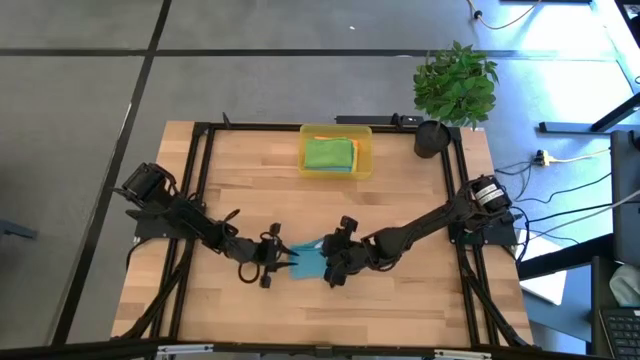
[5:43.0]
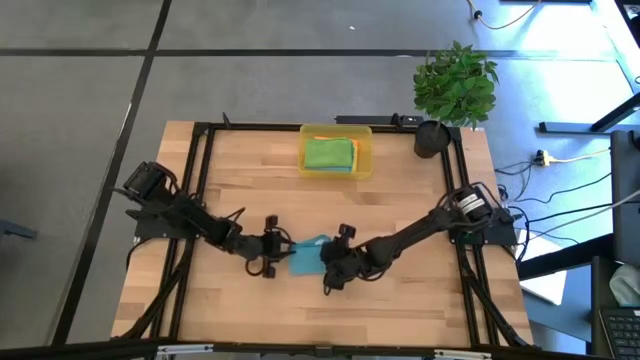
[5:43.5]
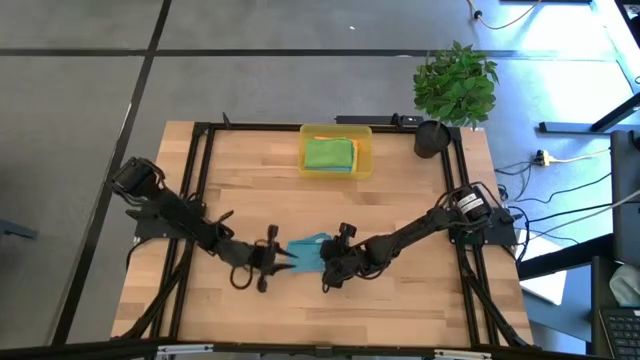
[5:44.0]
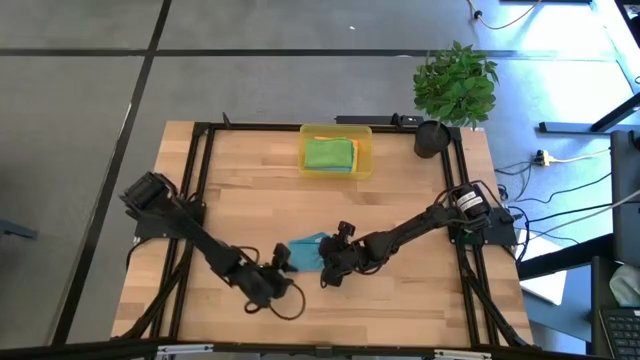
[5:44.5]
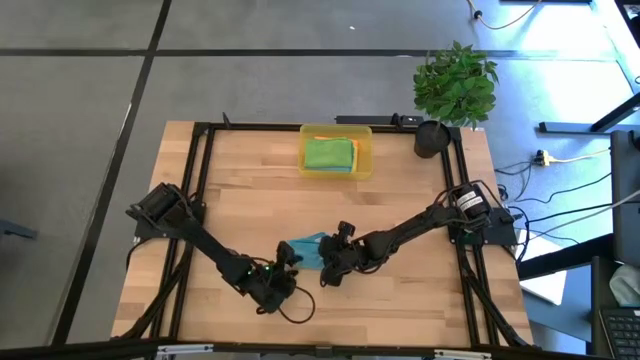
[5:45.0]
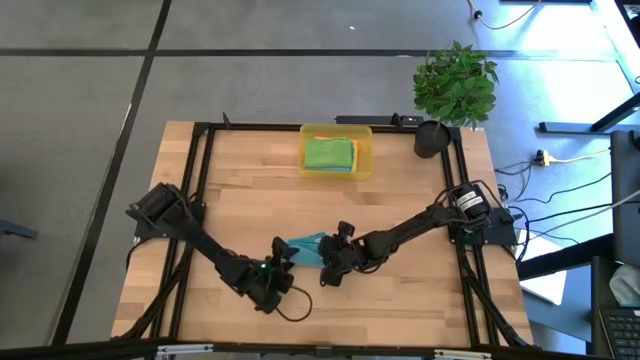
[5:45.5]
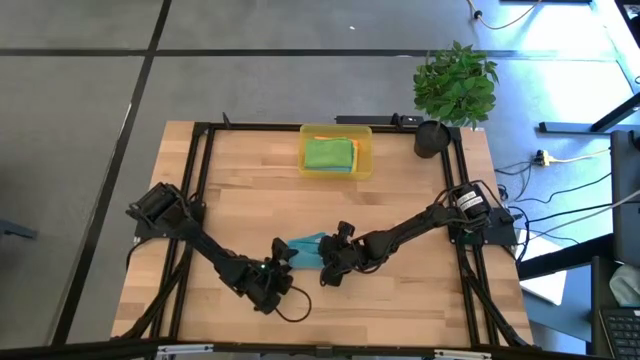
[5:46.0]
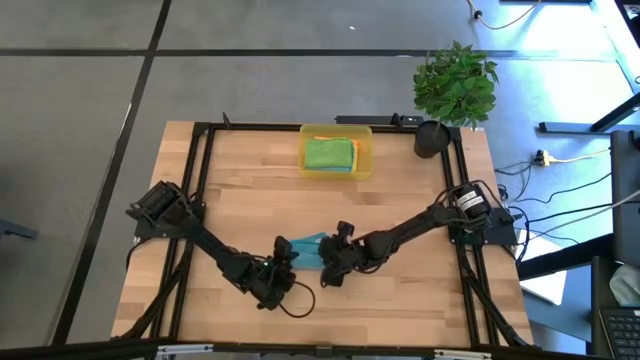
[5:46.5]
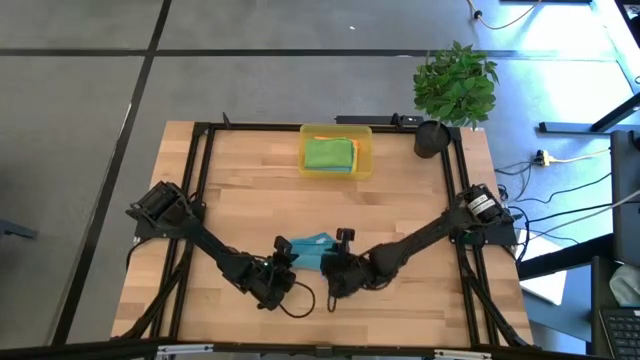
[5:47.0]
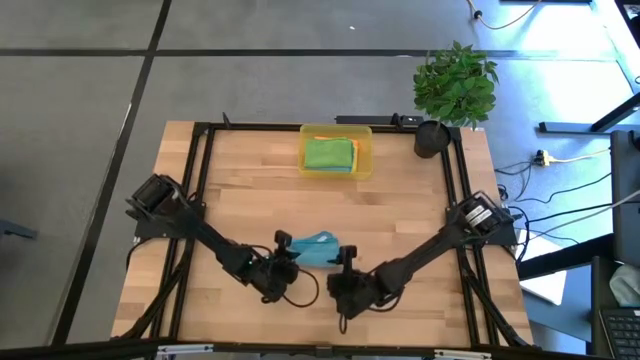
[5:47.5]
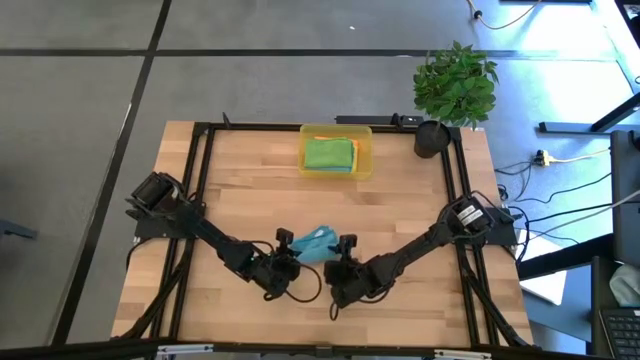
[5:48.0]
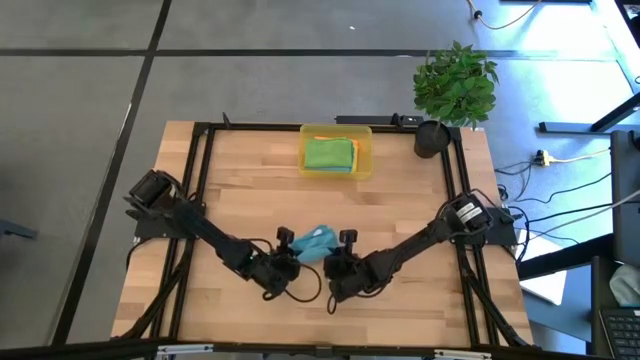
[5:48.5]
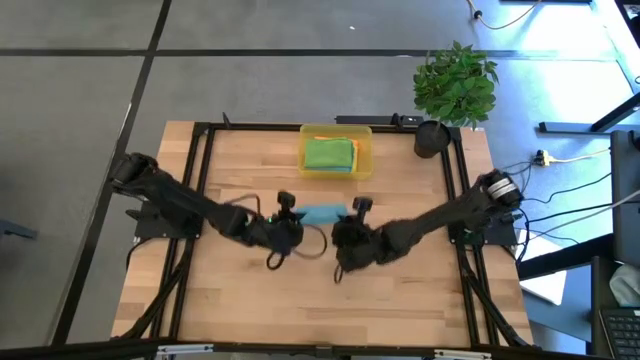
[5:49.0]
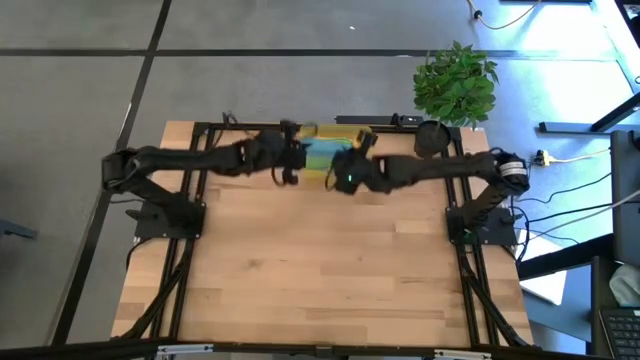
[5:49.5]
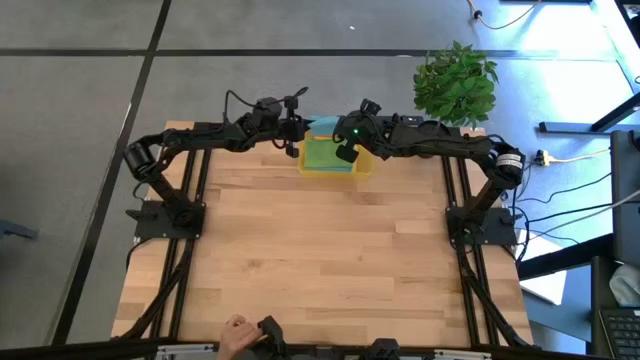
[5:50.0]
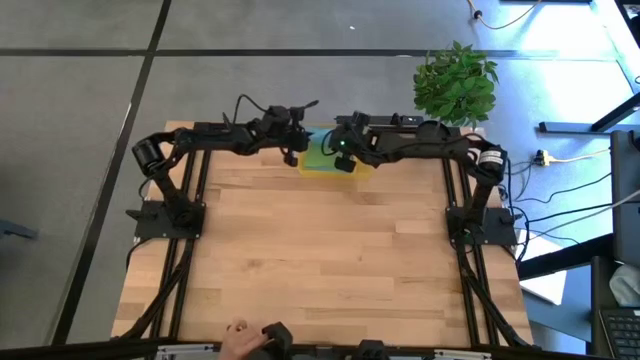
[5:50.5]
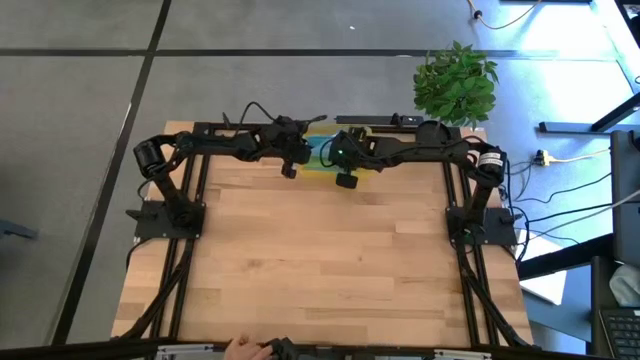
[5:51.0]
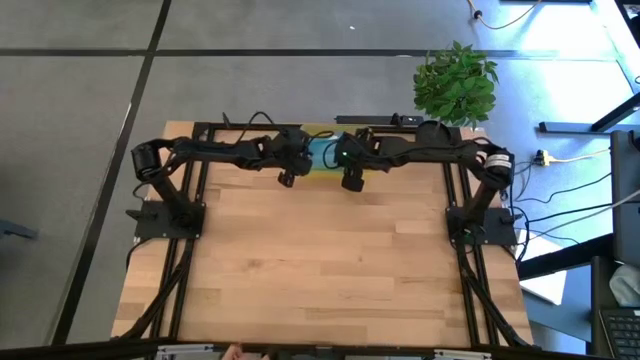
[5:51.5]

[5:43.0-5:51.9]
Task: Fold microfiber towels
Put the folded blue microfiber cloth into the yellow bin

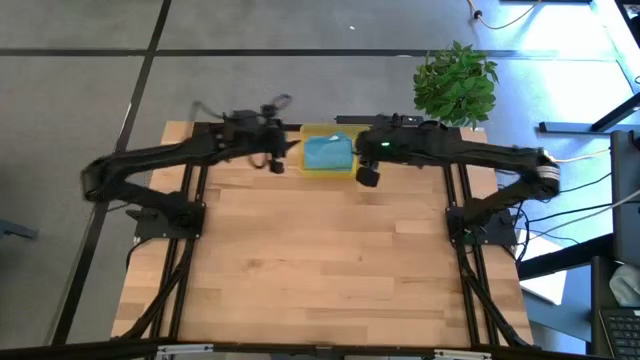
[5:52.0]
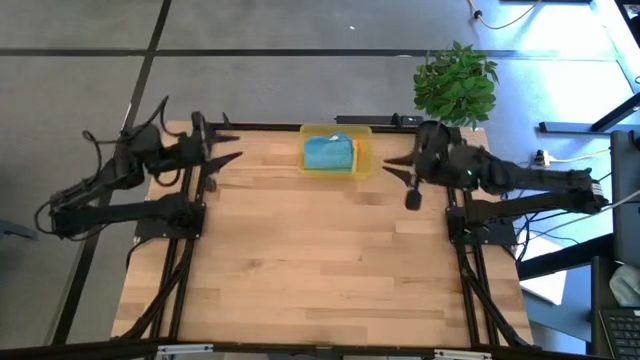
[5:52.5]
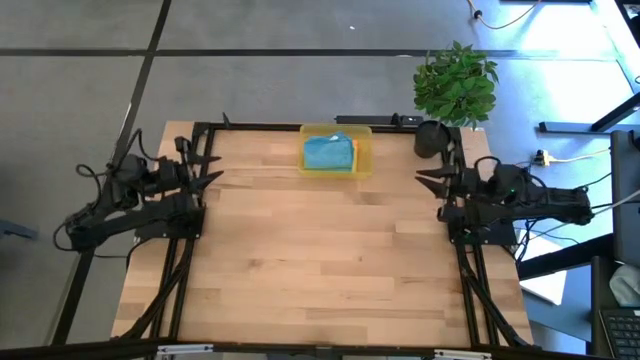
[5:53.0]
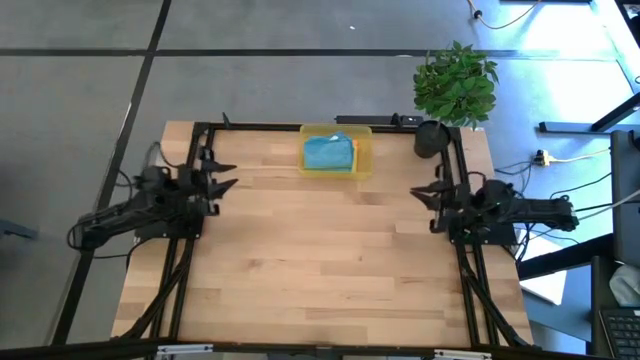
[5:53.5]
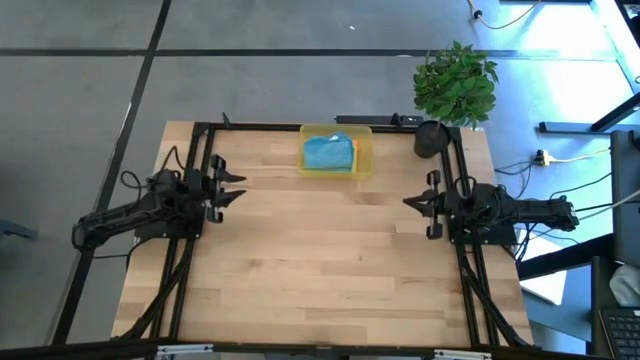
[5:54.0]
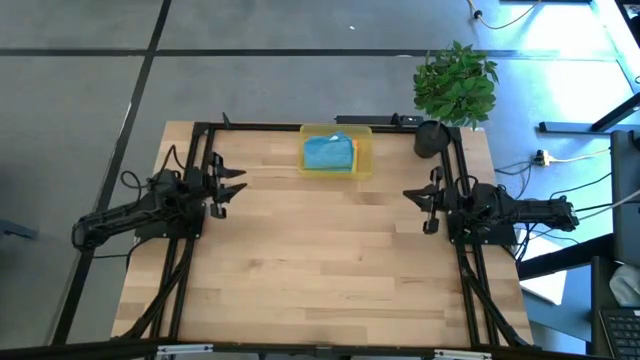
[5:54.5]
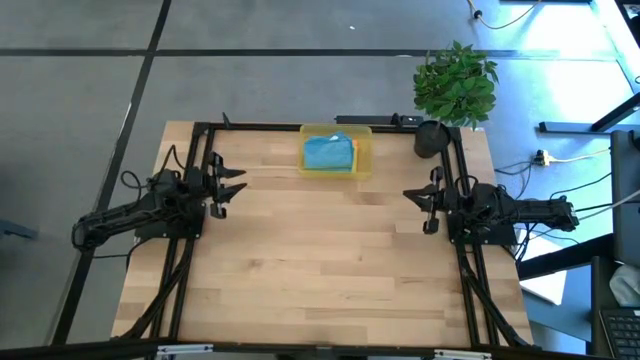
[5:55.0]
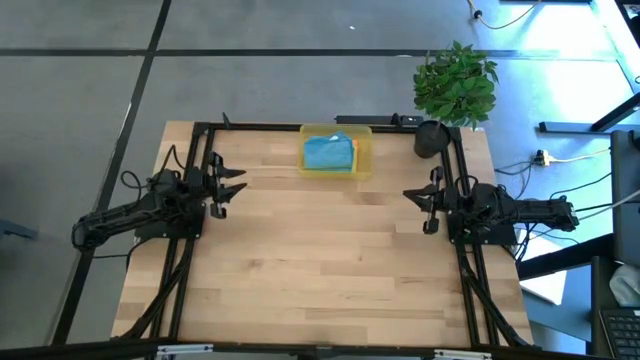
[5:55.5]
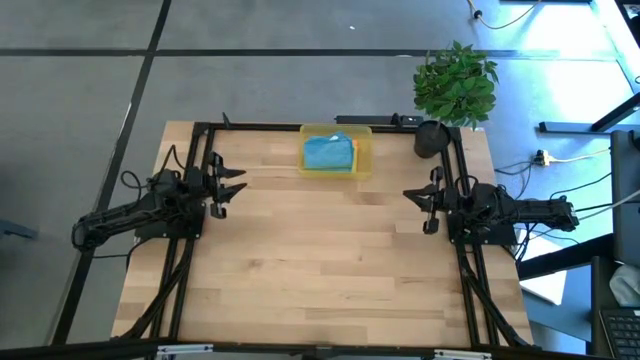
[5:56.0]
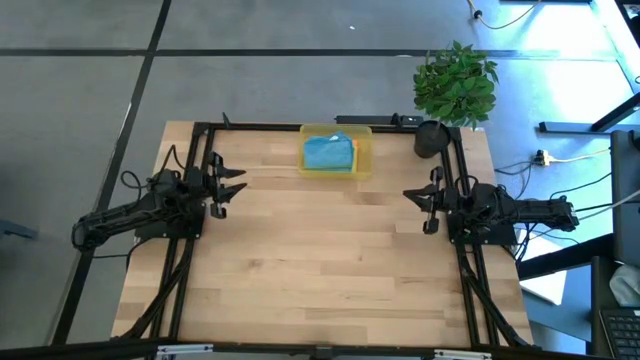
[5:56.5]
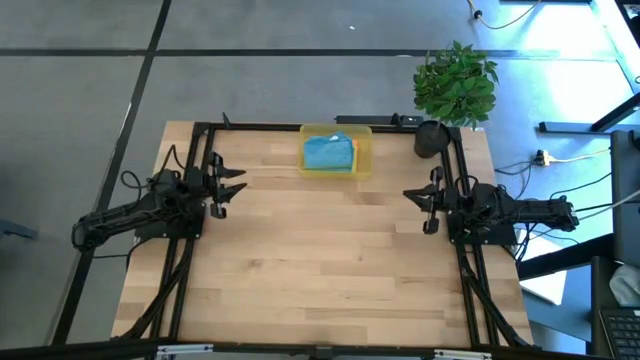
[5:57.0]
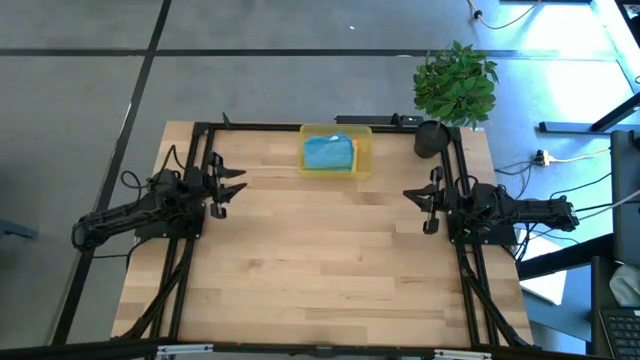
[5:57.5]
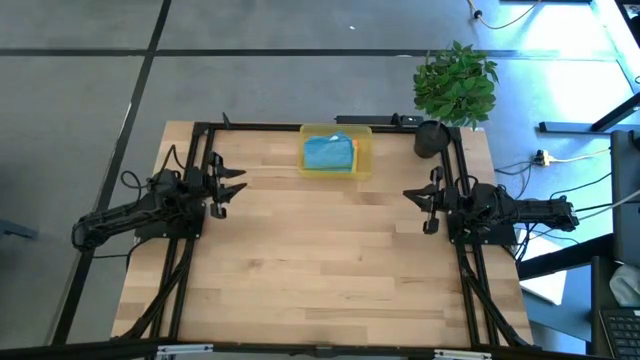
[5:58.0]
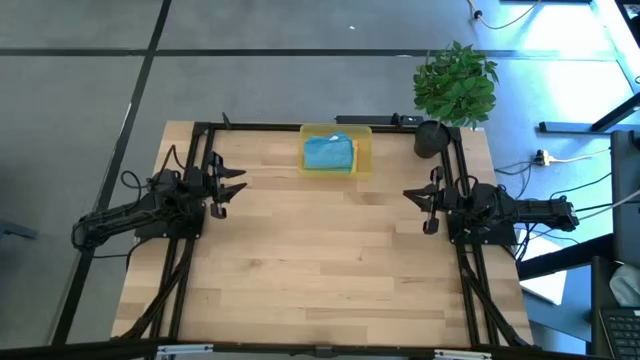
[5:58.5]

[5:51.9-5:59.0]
Return to Home Position

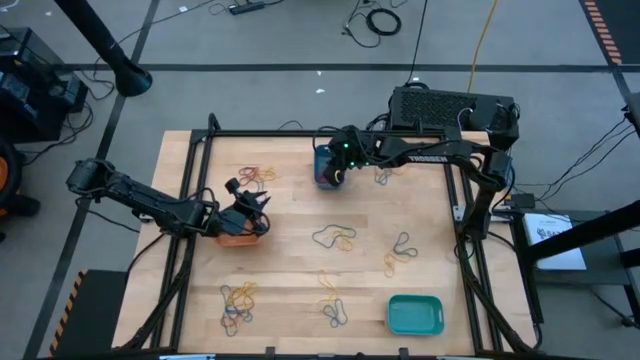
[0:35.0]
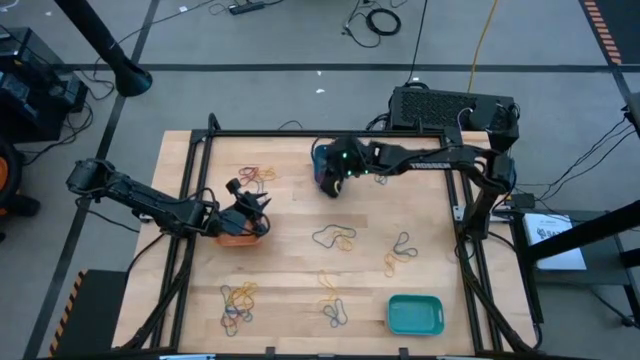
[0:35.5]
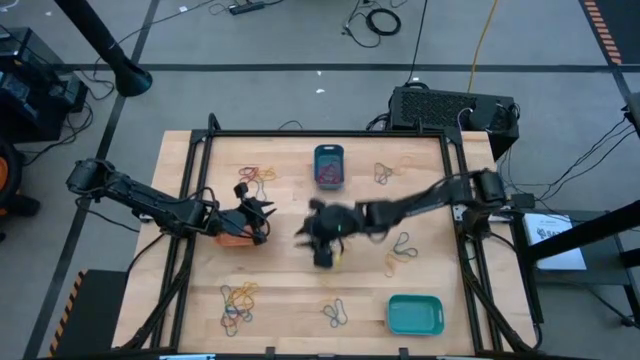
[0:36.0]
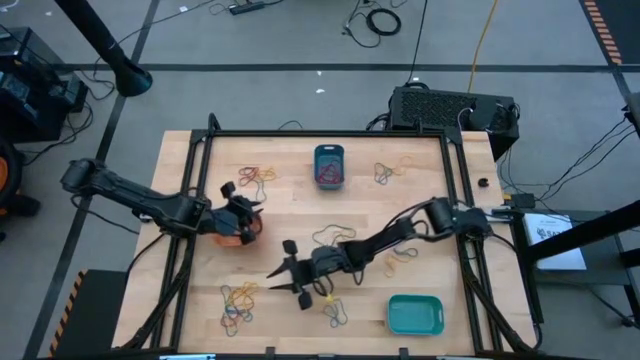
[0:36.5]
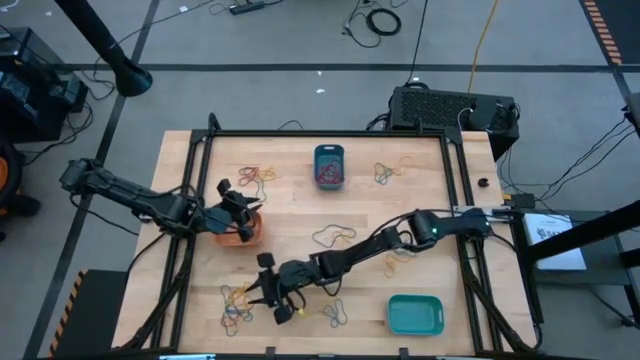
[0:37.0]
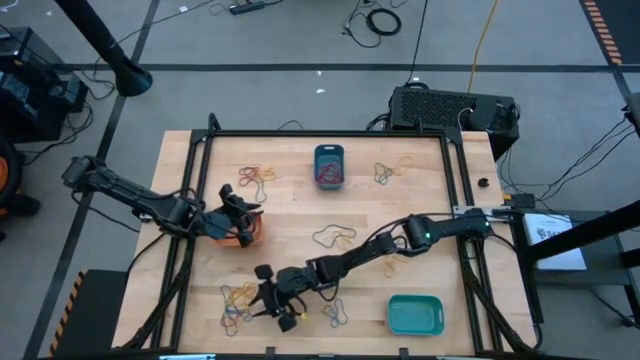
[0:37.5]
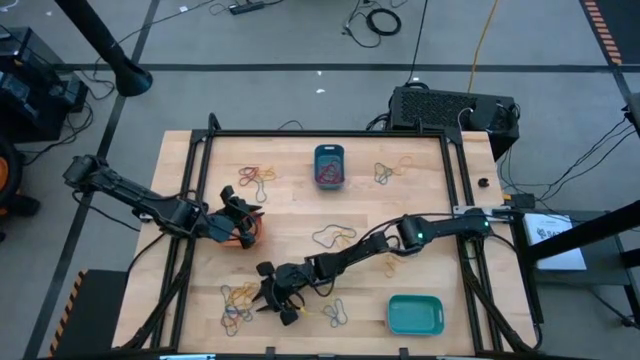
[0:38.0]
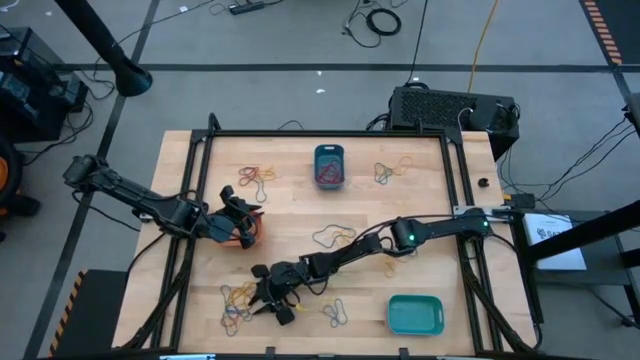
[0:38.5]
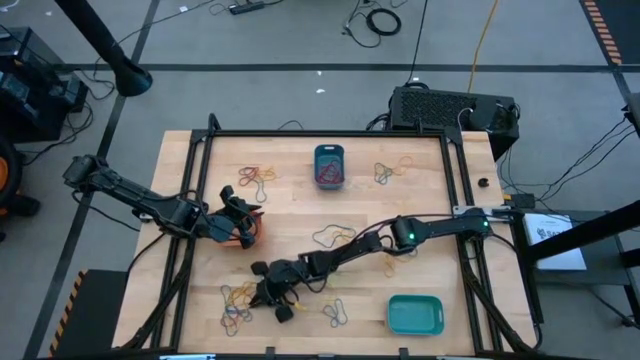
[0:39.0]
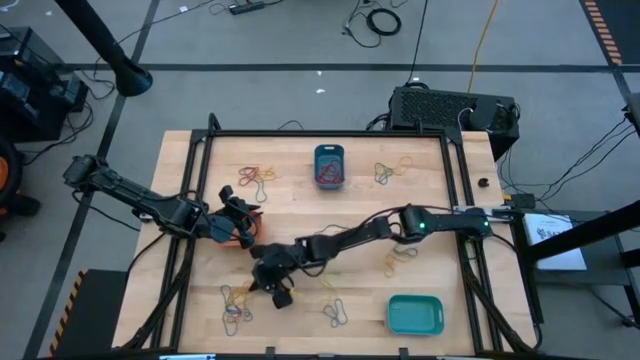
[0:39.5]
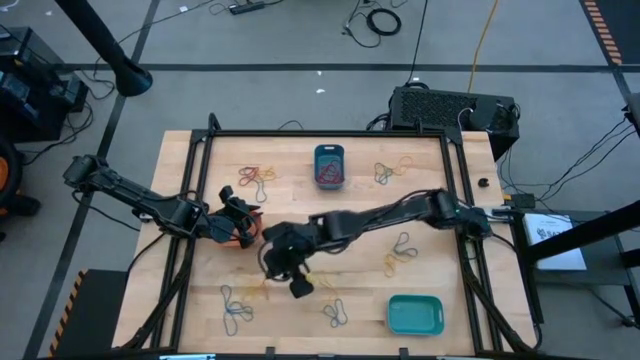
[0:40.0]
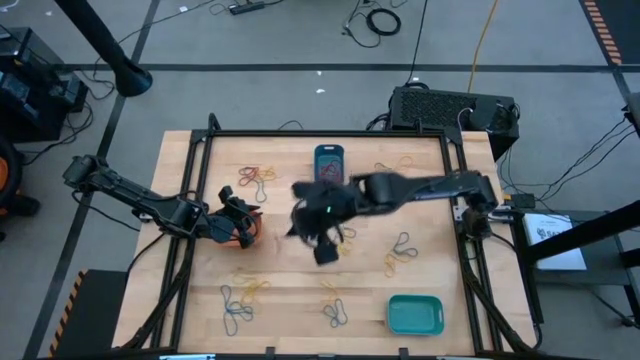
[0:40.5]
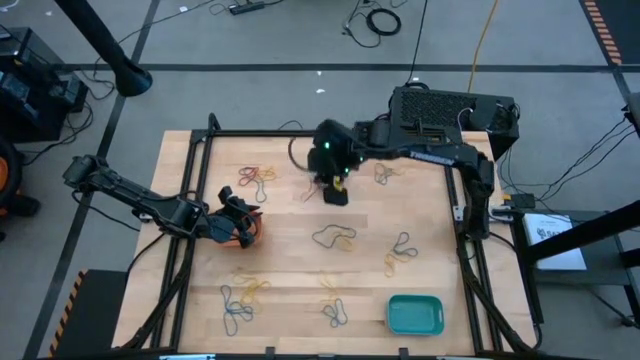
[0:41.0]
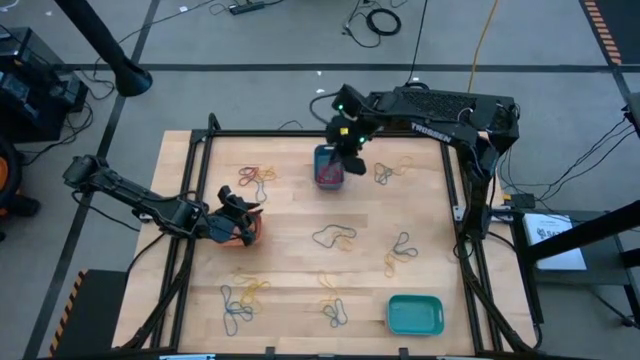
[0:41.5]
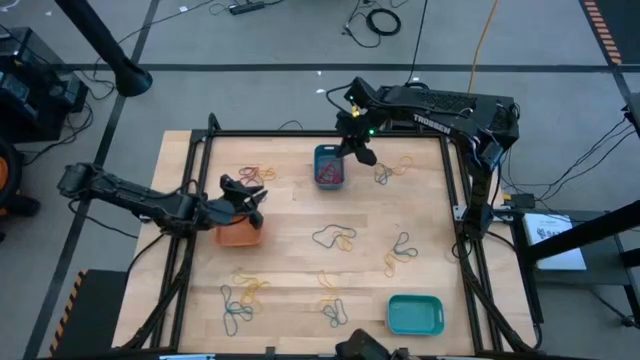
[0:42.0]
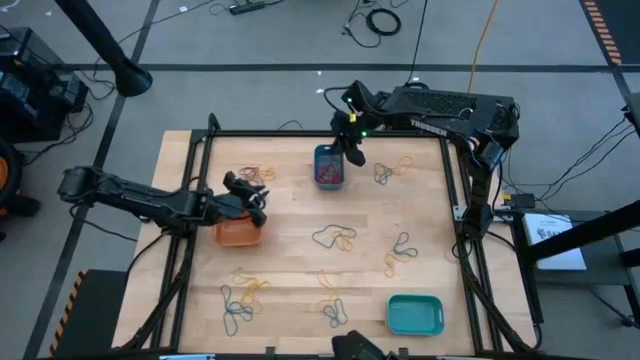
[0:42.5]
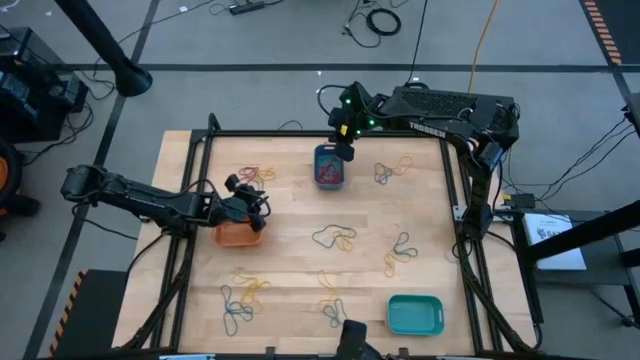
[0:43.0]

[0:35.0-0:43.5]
Task: Sort rubber bands into baskets
Put the bottom red rubber band into the blue bin
